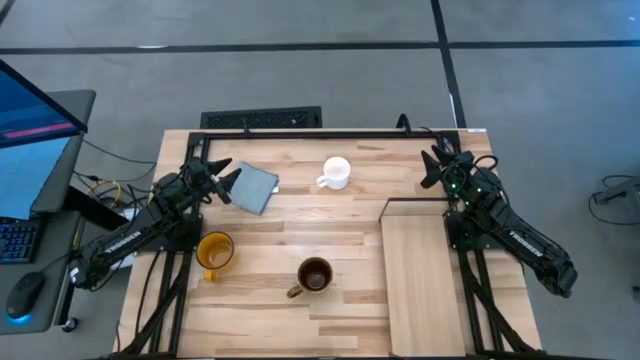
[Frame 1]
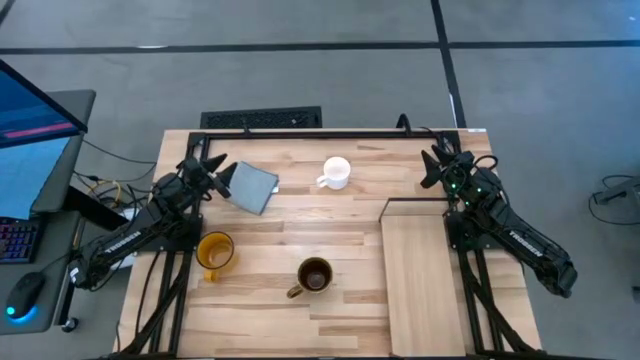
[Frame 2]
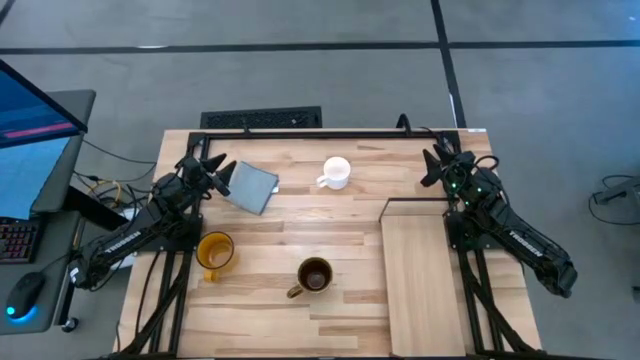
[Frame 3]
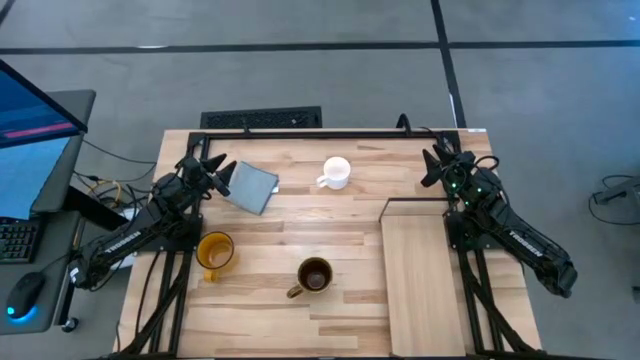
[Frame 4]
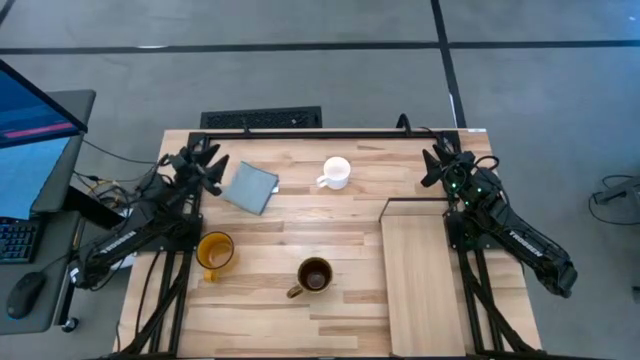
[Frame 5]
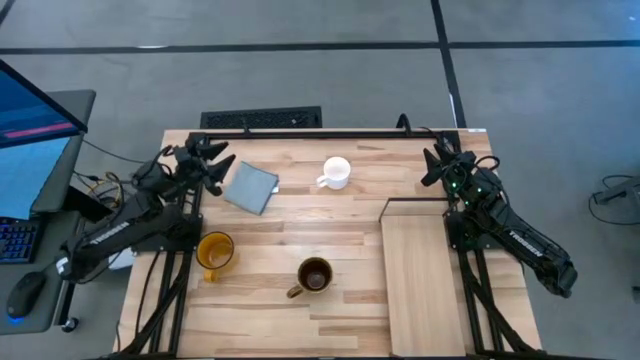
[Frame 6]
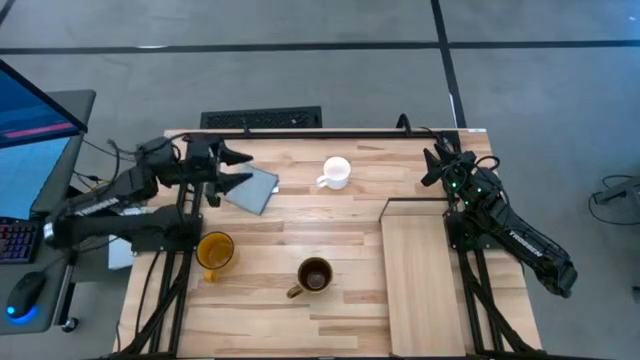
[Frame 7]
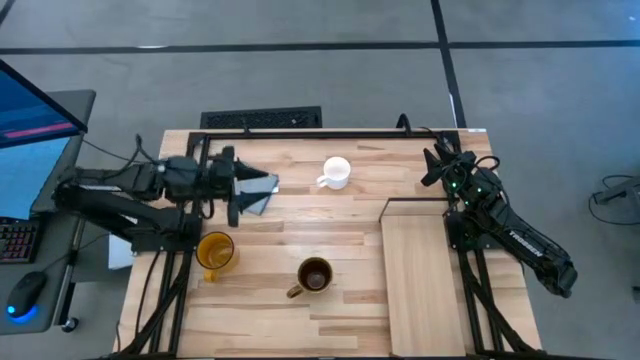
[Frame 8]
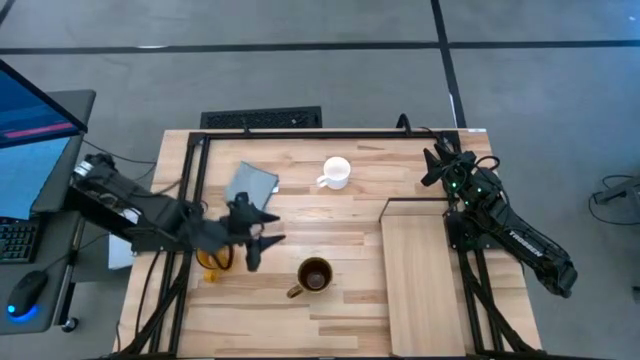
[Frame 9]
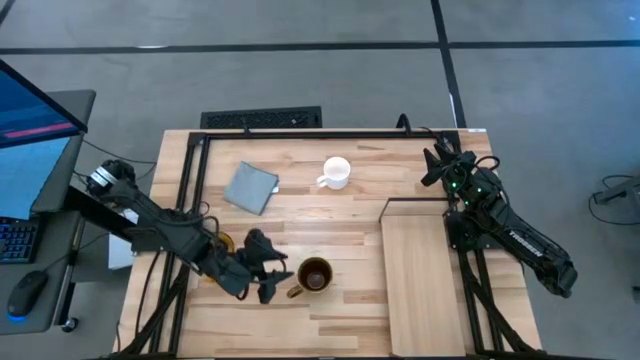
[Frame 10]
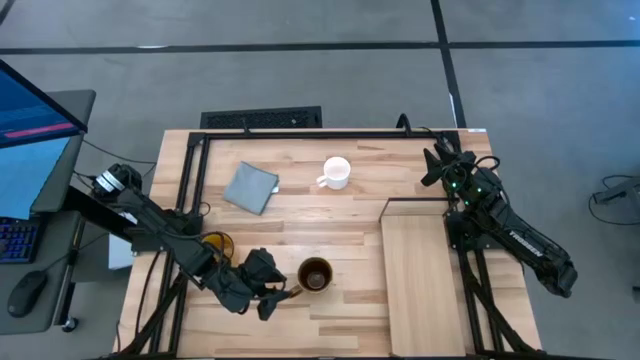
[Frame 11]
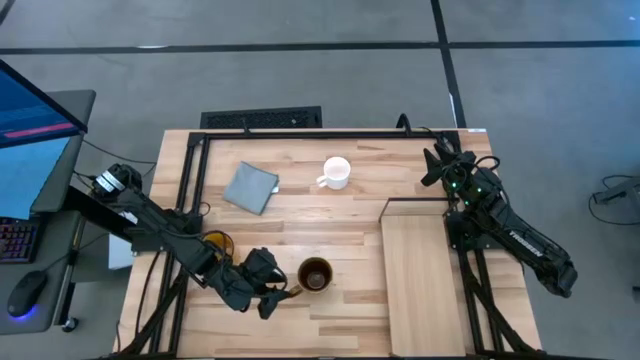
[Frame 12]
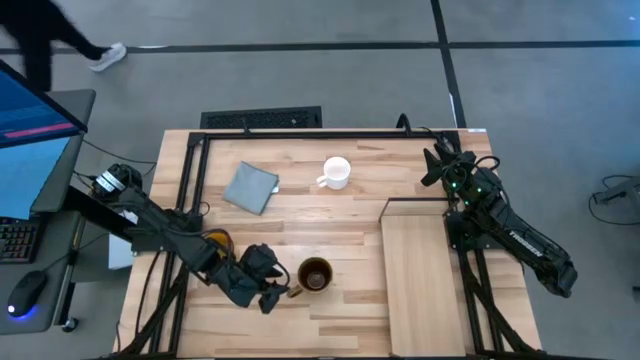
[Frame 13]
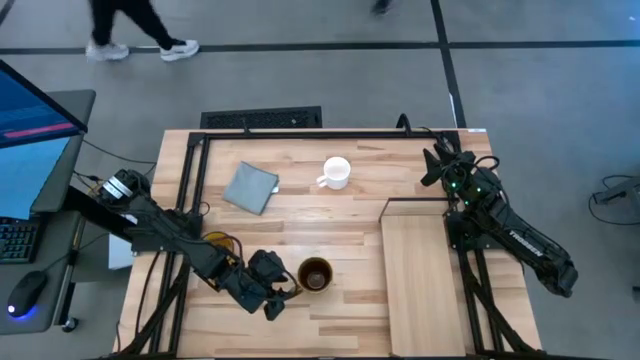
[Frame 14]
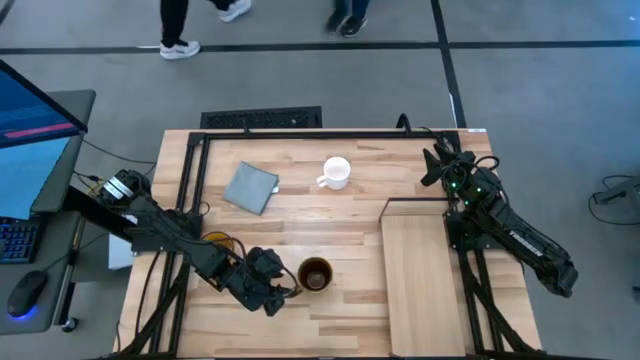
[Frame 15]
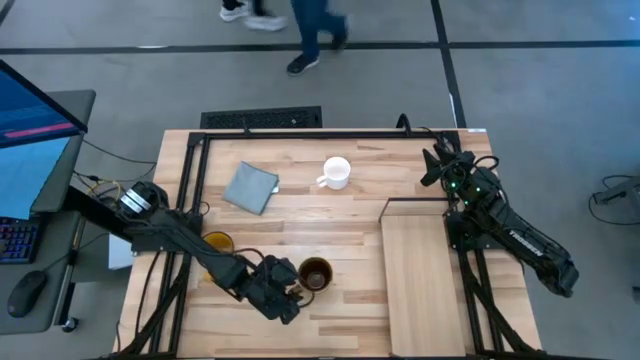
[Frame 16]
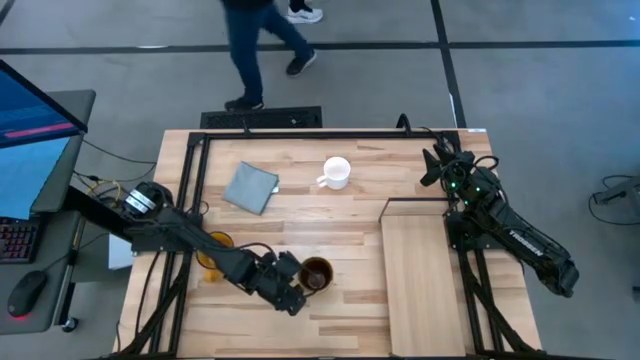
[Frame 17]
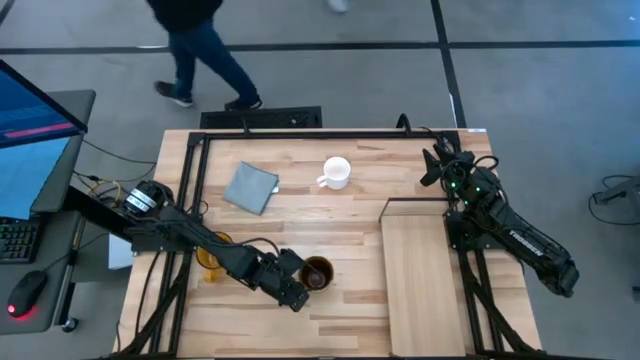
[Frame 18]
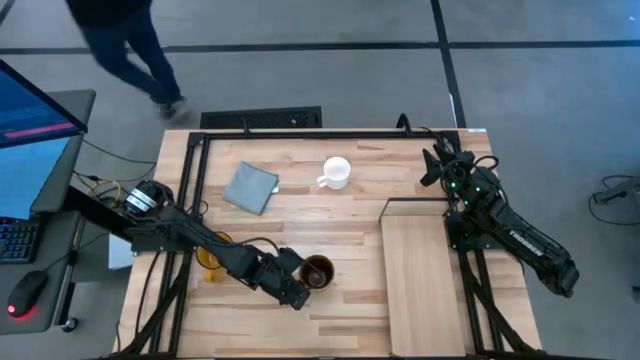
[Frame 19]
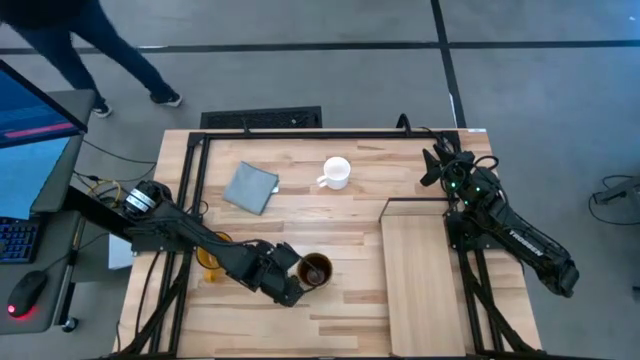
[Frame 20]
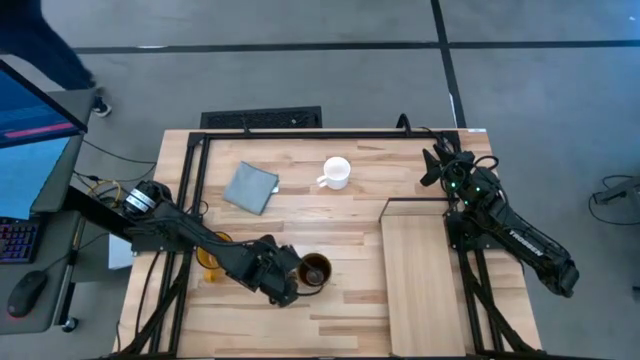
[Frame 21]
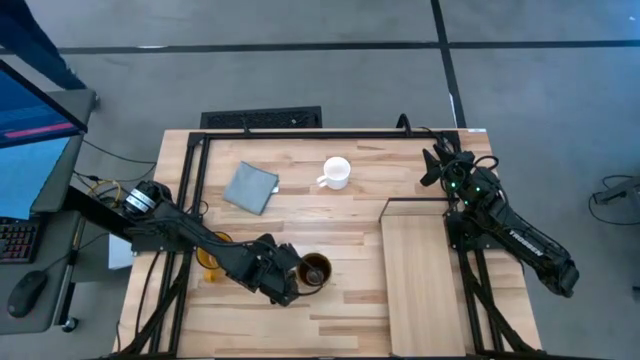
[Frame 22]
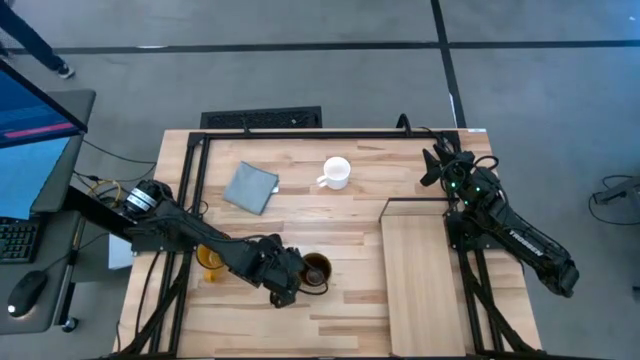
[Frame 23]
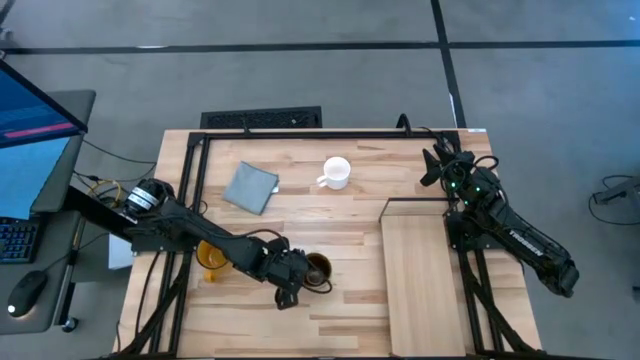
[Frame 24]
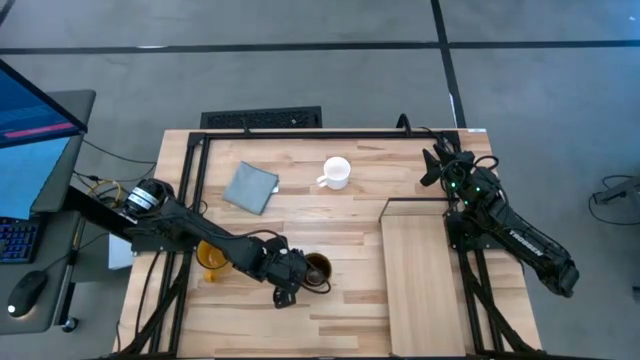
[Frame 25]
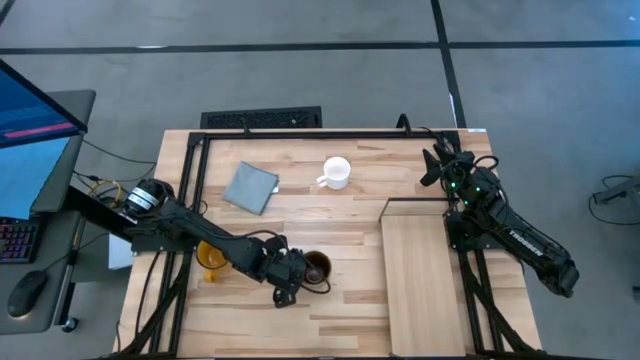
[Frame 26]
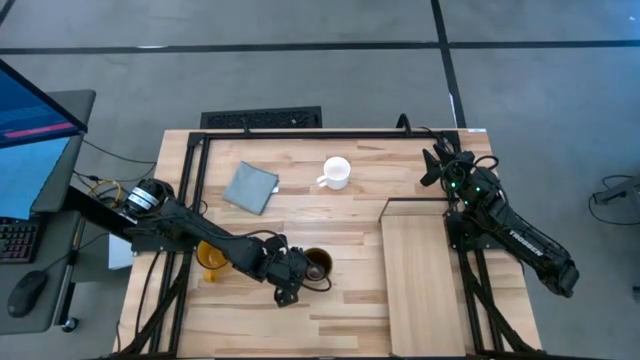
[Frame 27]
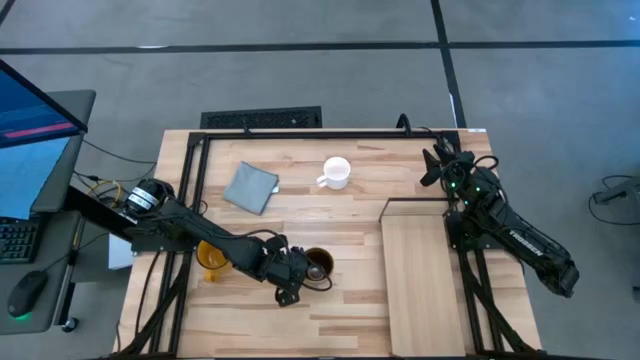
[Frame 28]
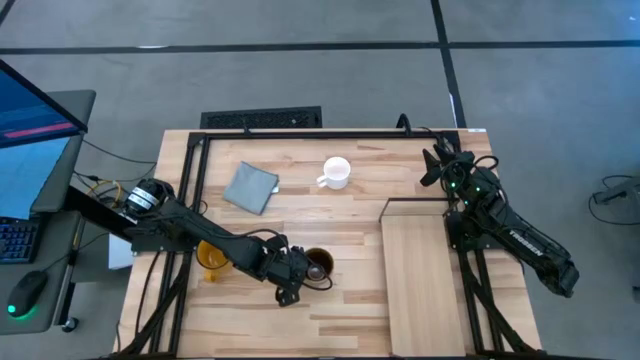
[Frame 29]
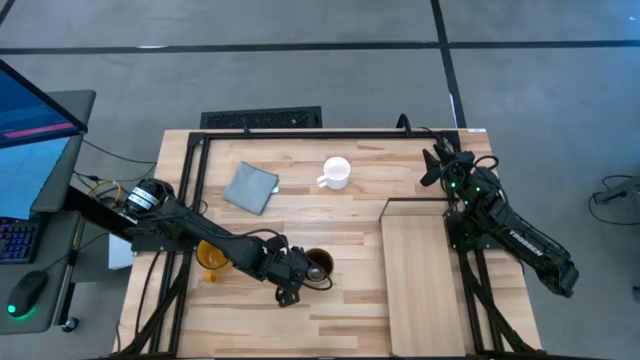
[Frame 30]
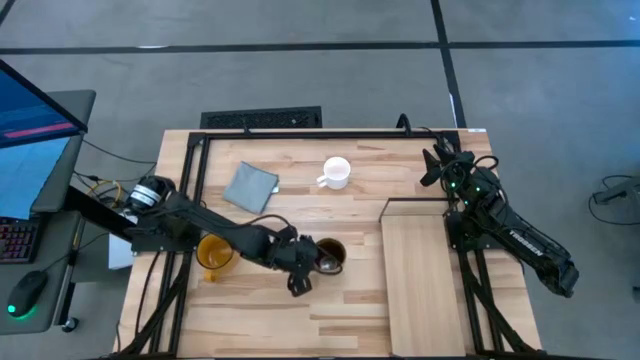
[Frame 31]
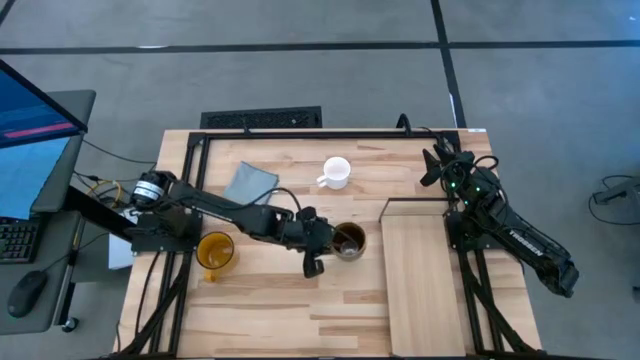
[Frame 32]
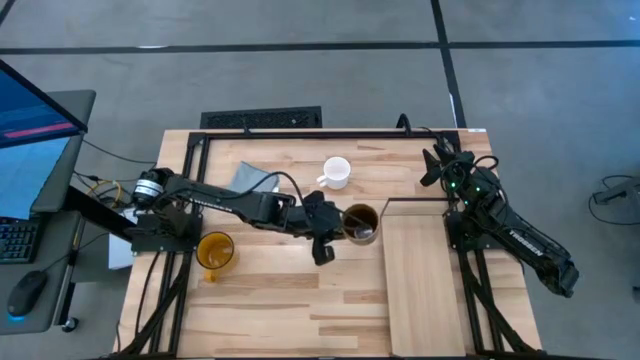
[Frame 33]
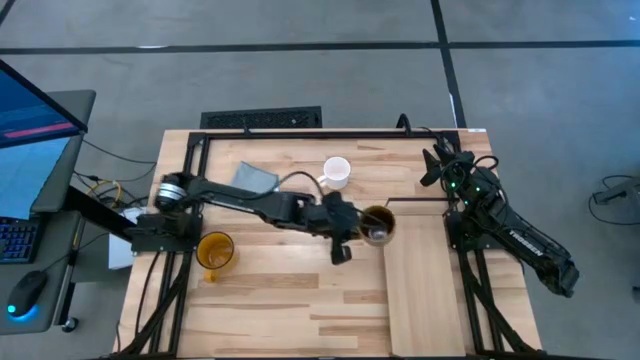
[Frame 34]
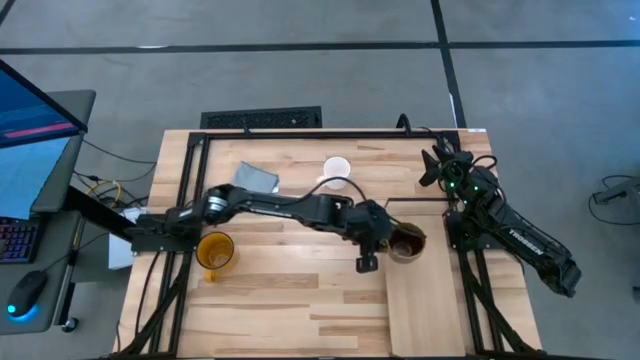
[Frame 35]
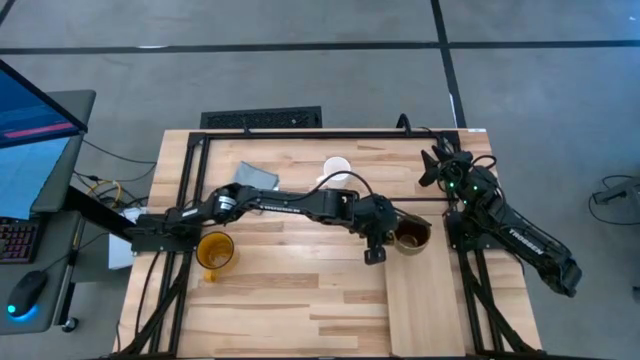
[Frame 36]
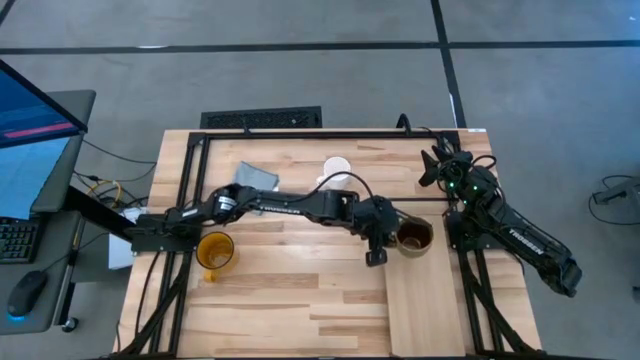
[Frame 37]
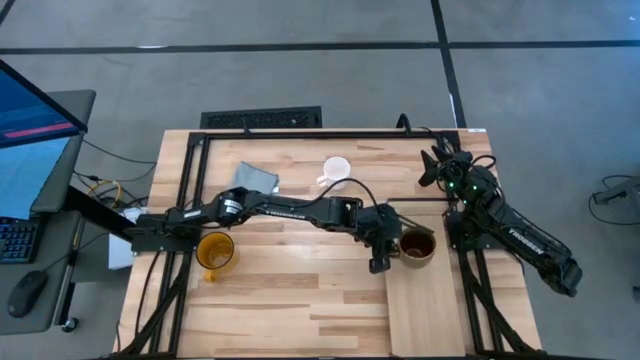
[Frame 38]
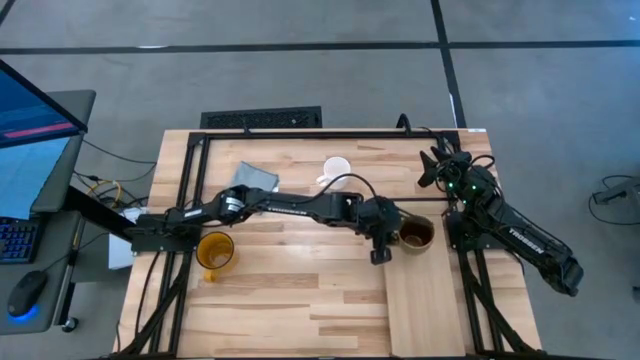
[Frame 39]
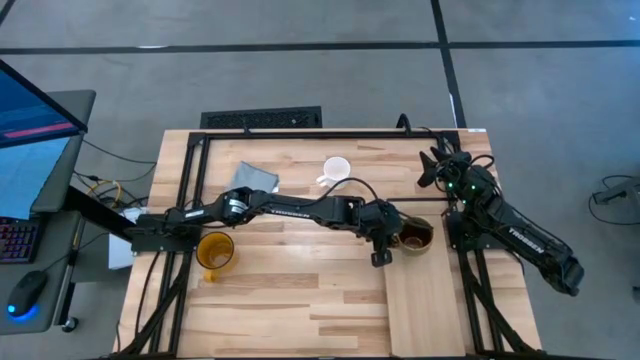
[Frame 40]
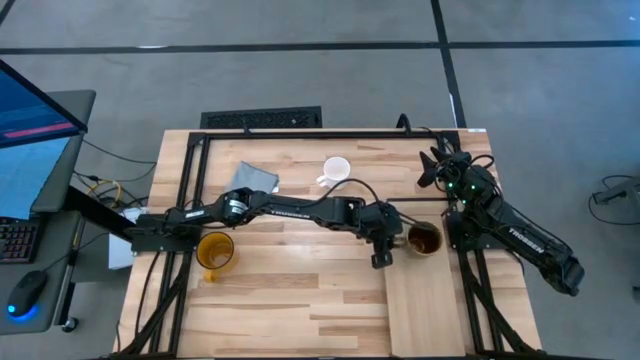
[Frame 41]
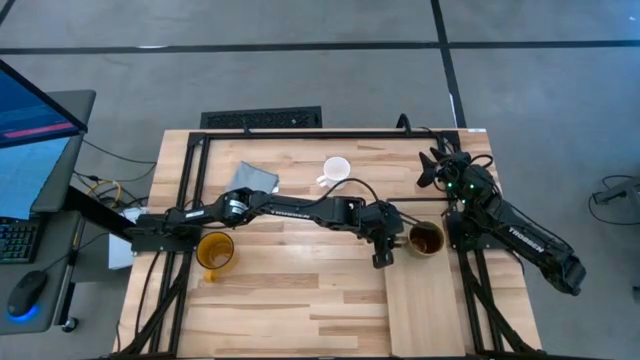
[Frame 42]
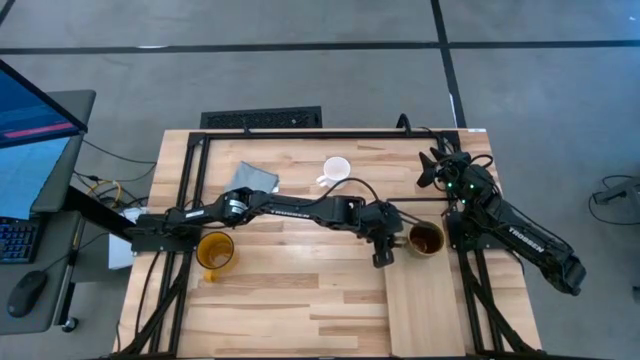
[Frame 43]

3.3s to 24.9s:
Task: Stack small to large cups/mugs on shelf
Put the green patterned mug on the shelf
